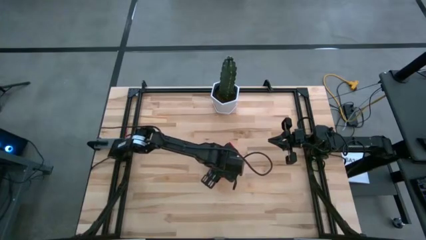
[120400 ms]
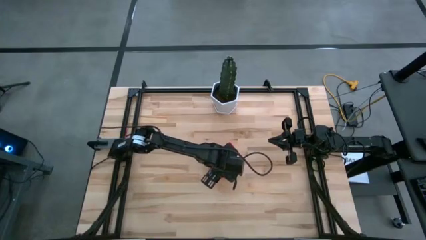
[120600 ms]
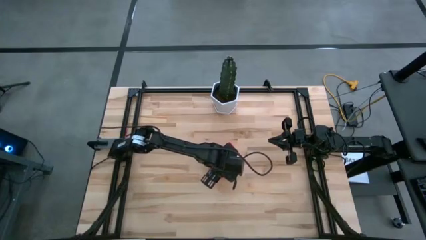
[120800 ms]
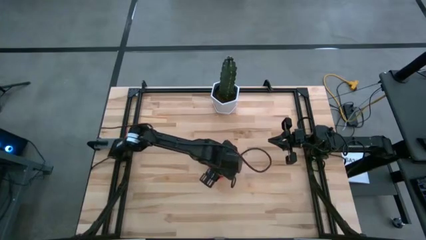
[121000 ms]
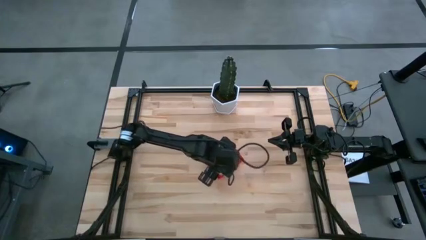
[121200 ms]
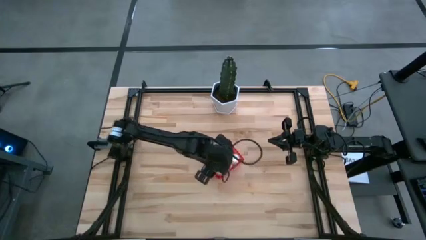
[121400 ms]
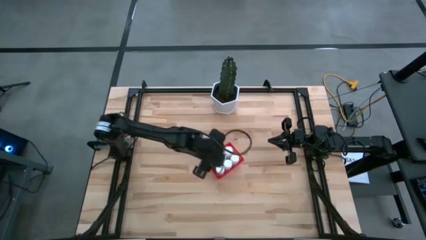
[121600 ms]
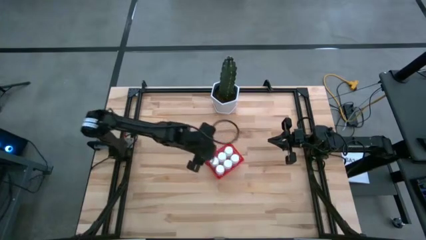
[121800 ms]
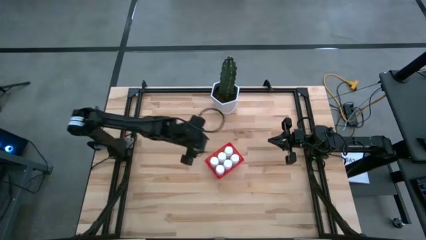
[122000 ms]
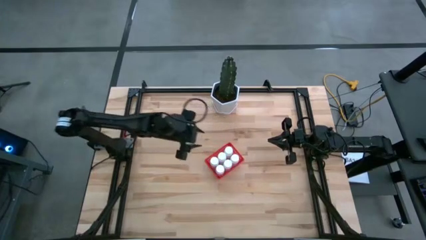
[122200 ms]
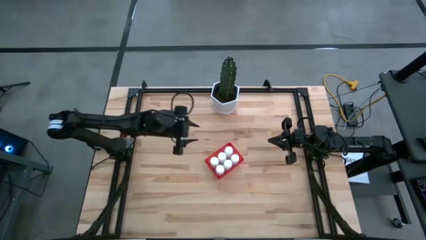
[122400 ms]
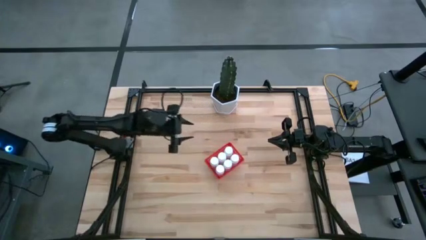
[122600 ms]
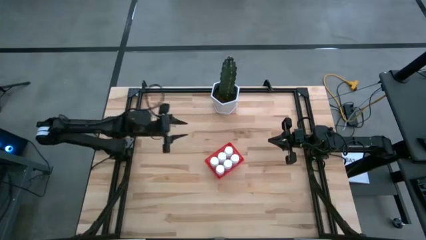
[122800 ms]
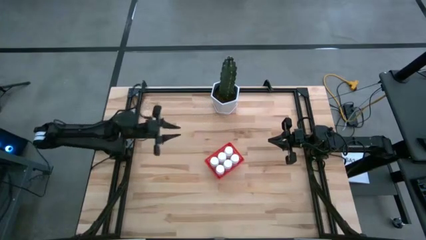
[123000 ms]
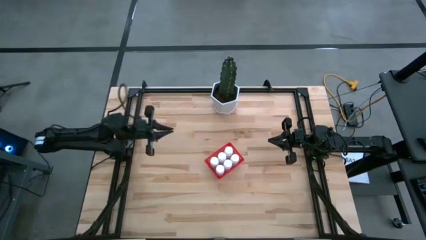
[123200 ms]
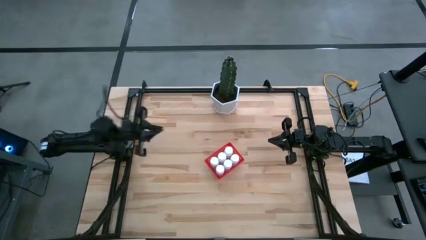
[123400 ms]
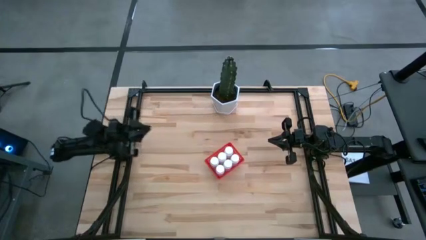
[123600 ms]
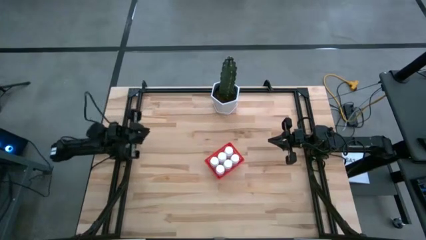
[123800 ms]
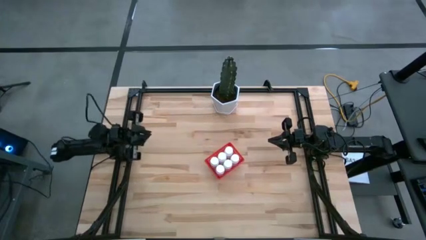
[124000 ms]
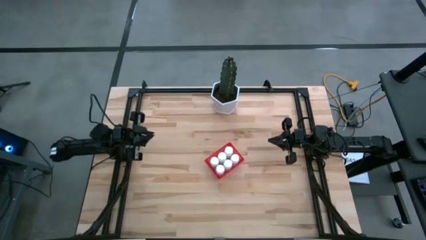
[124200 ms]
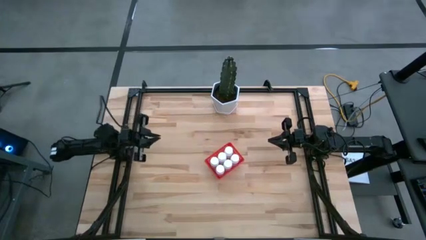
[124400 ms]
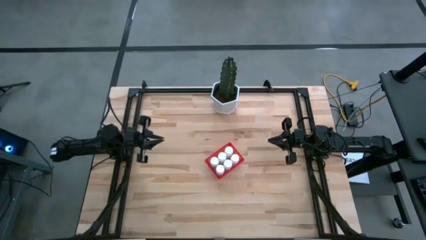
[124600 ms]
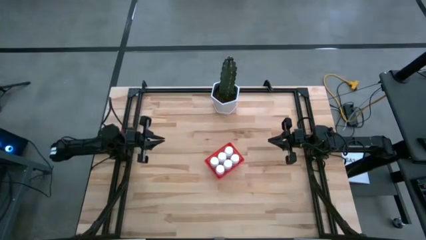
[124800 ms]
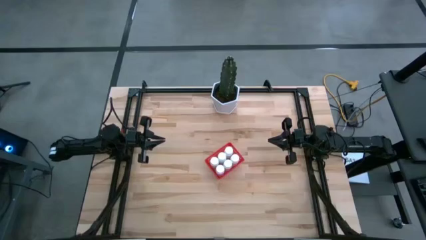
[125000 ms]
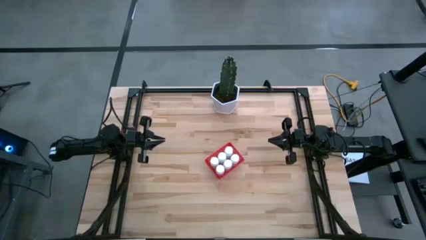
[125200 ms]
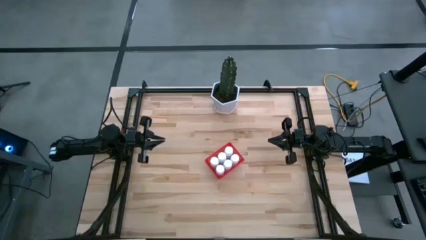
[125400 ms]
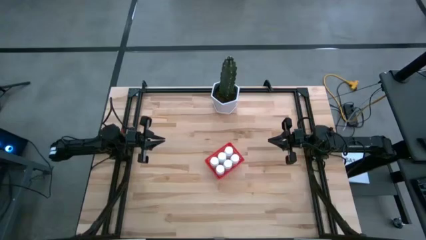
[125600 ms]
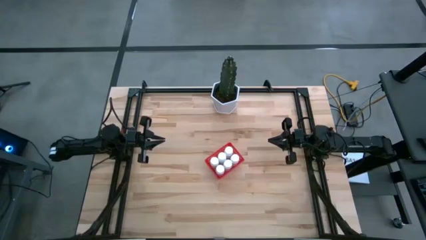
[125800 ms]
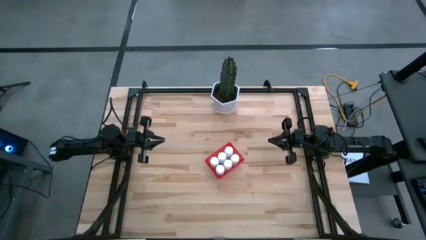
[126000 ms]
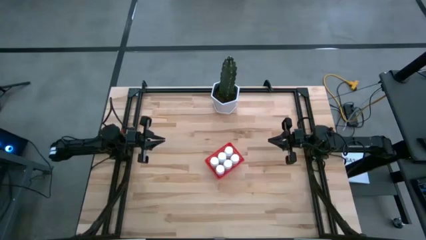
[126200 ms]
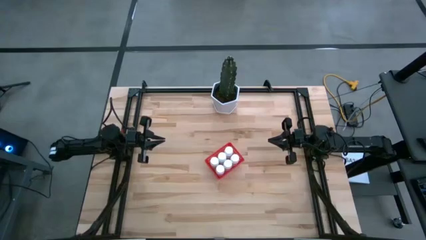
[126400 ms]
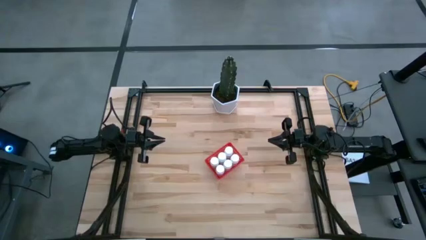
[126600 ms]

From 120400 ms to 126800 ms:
Task: Pick and place pill bottles into a basket
Return to Home Position

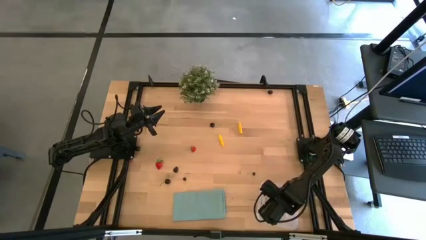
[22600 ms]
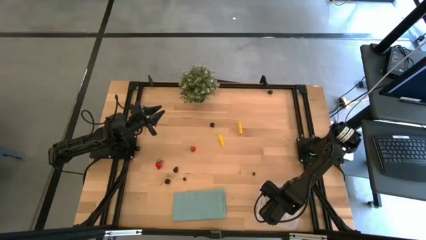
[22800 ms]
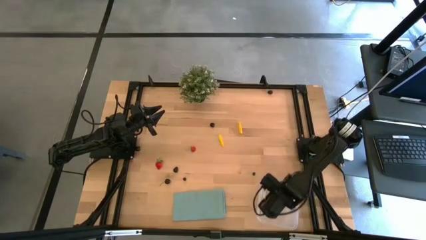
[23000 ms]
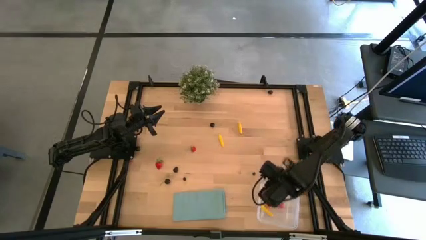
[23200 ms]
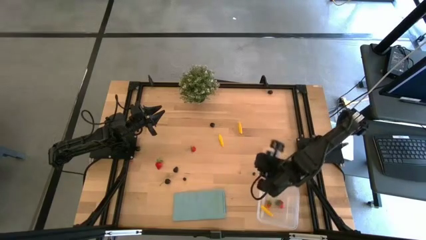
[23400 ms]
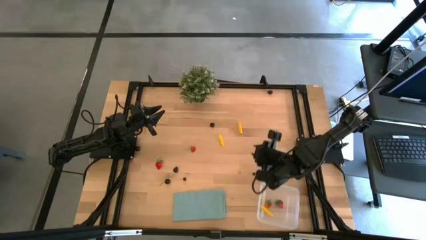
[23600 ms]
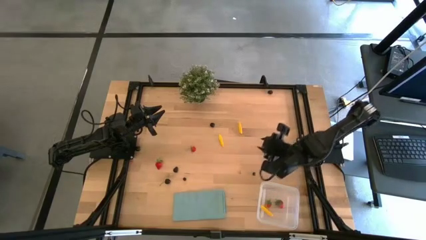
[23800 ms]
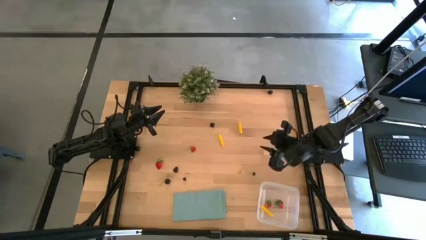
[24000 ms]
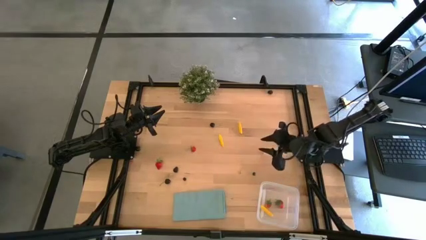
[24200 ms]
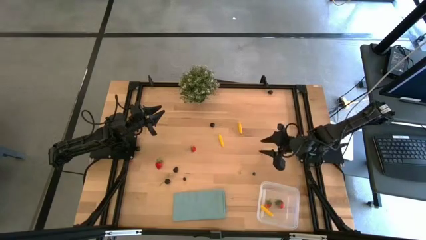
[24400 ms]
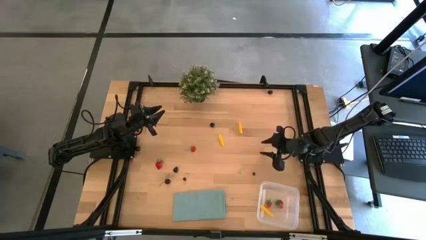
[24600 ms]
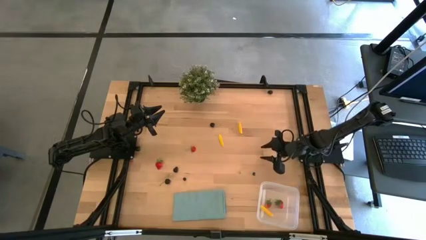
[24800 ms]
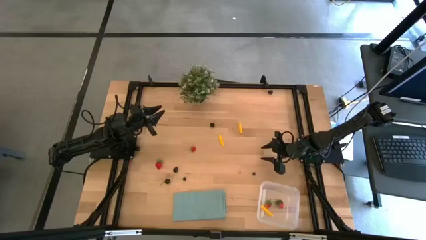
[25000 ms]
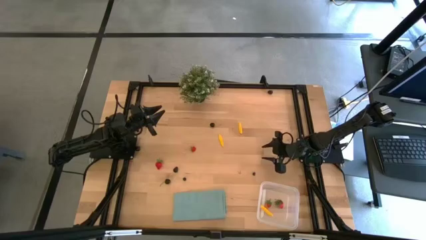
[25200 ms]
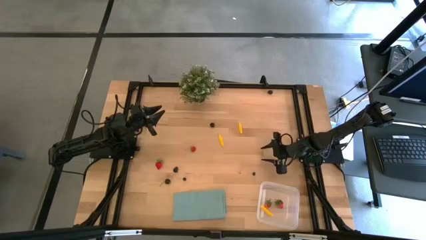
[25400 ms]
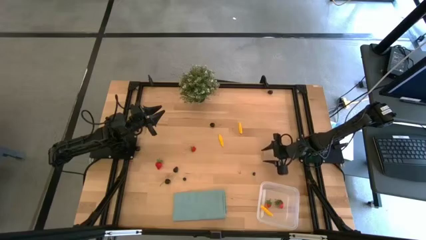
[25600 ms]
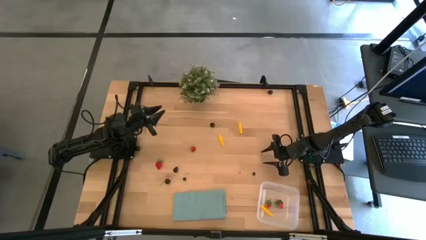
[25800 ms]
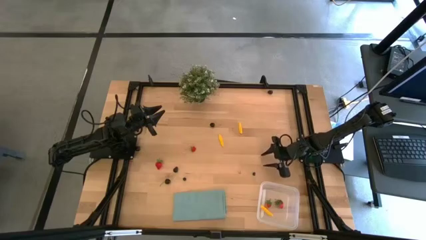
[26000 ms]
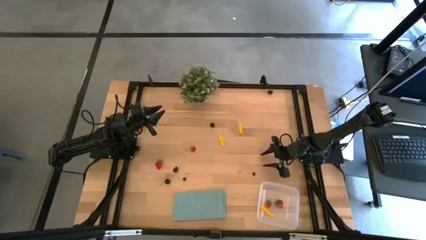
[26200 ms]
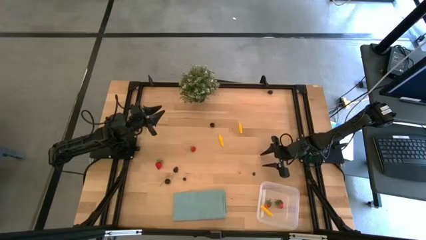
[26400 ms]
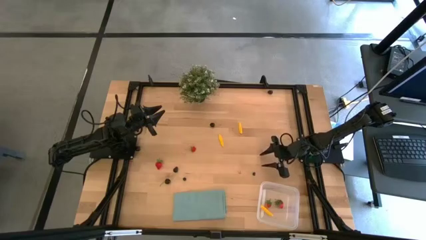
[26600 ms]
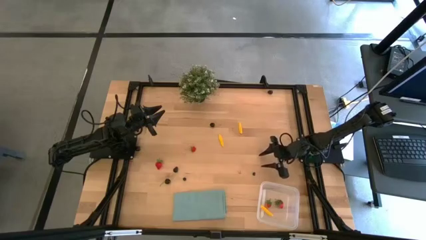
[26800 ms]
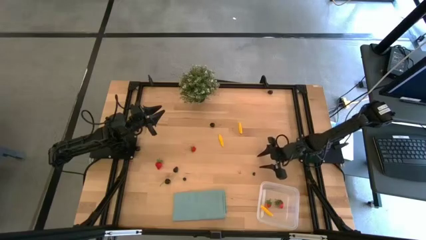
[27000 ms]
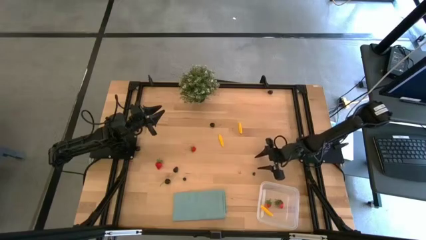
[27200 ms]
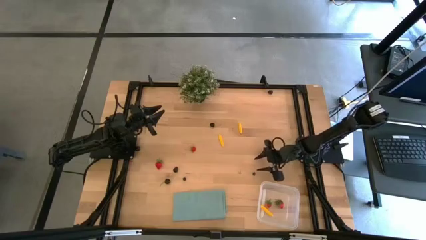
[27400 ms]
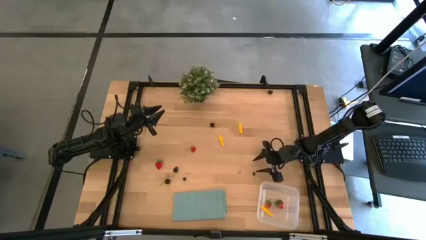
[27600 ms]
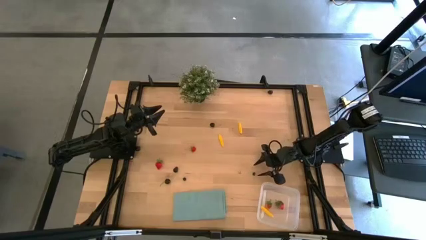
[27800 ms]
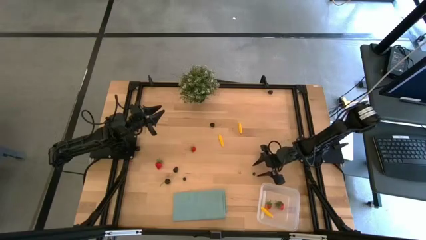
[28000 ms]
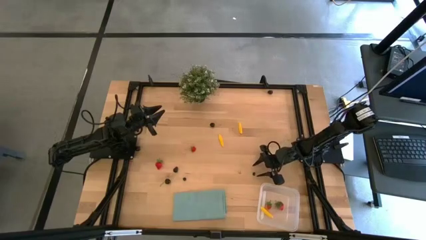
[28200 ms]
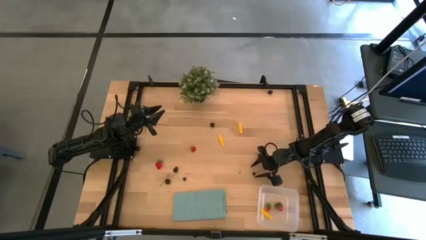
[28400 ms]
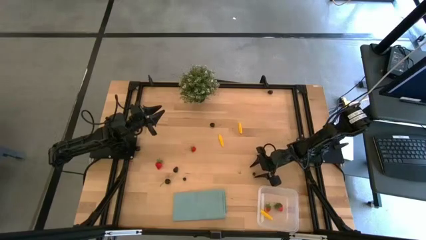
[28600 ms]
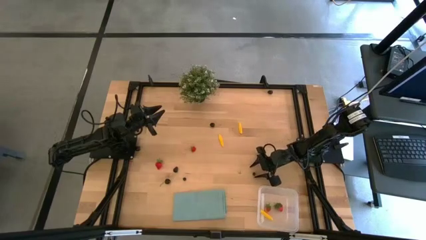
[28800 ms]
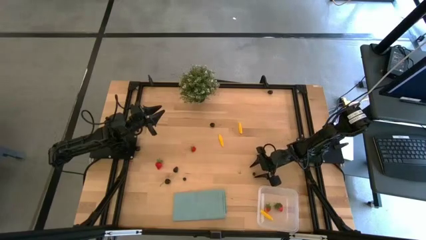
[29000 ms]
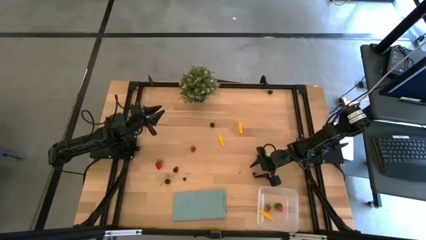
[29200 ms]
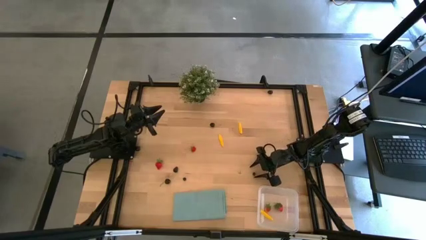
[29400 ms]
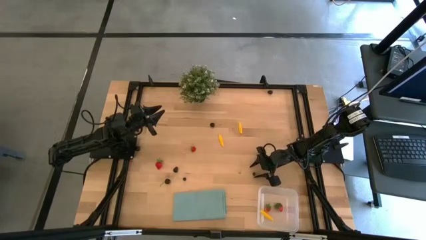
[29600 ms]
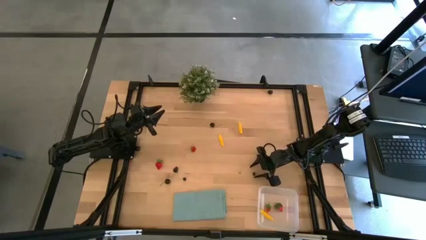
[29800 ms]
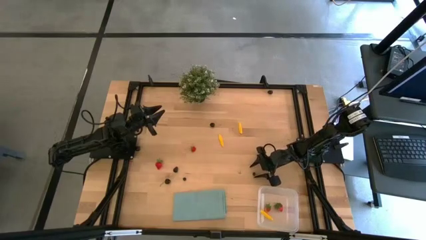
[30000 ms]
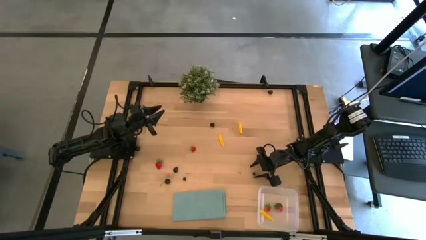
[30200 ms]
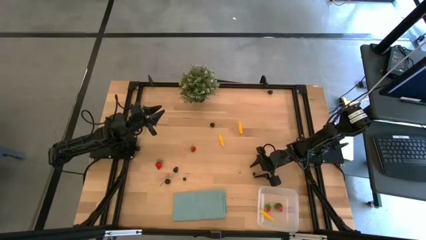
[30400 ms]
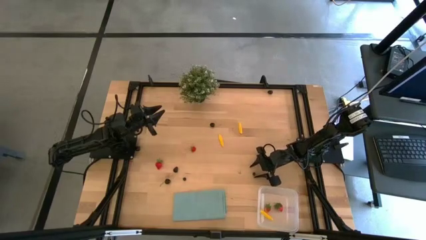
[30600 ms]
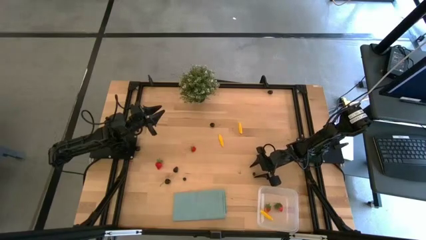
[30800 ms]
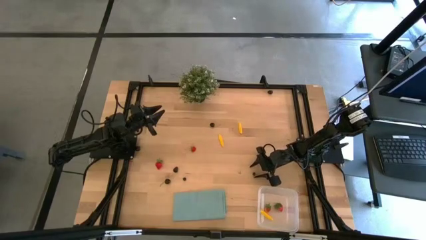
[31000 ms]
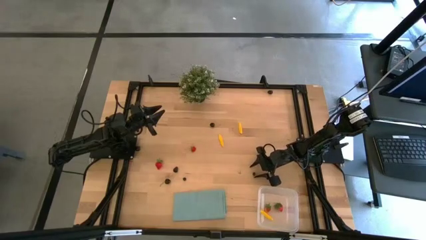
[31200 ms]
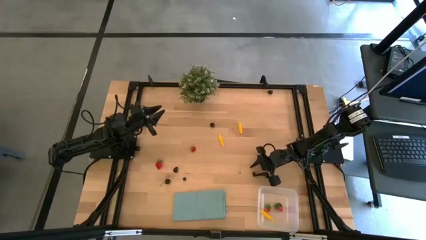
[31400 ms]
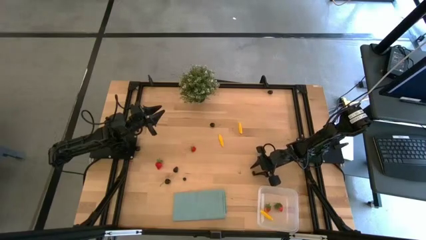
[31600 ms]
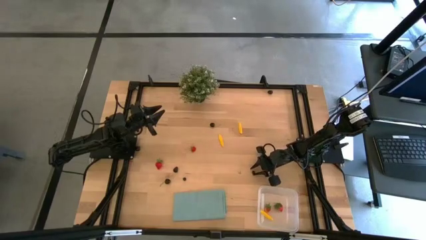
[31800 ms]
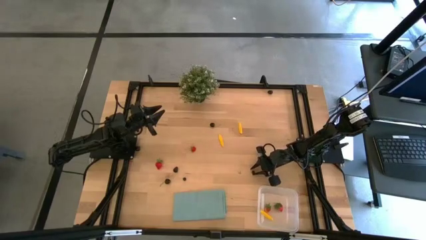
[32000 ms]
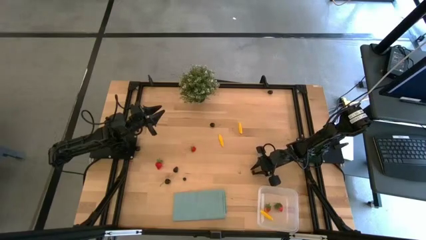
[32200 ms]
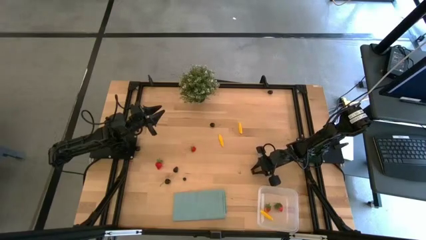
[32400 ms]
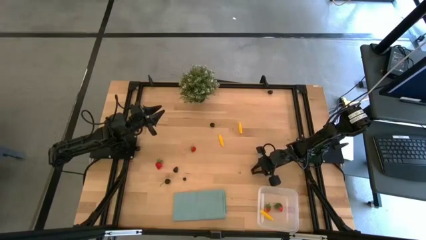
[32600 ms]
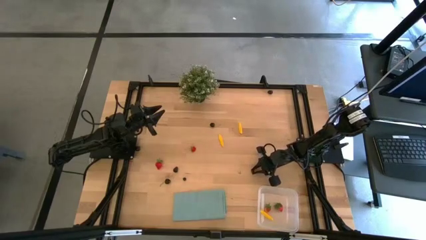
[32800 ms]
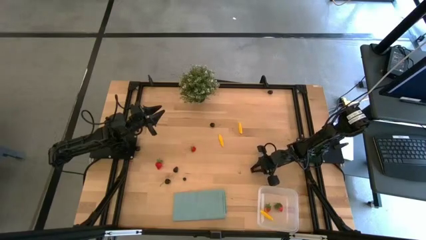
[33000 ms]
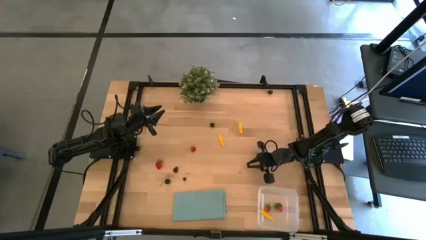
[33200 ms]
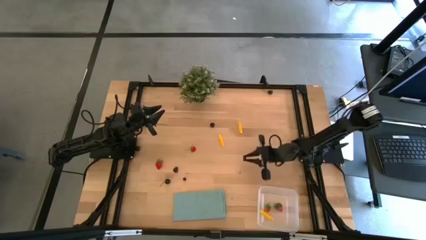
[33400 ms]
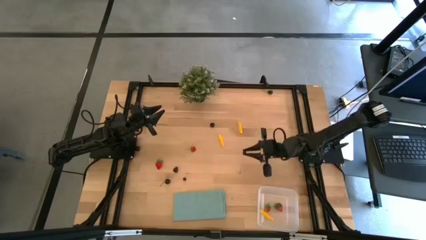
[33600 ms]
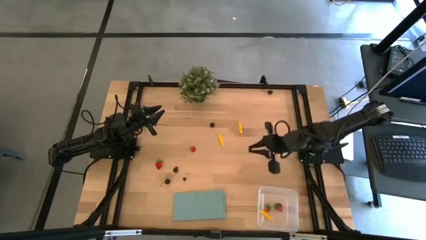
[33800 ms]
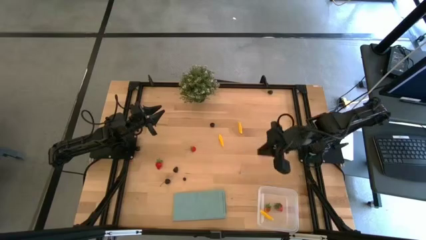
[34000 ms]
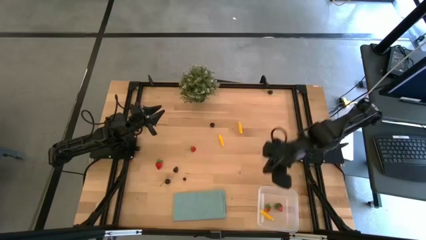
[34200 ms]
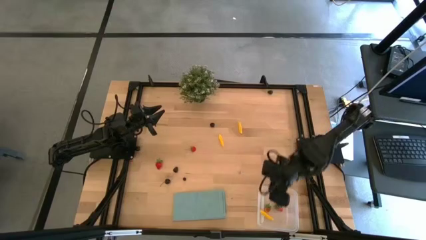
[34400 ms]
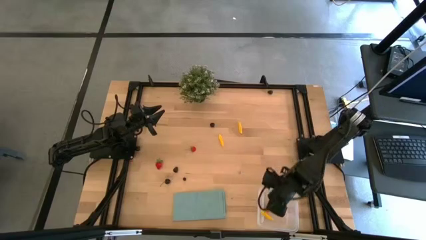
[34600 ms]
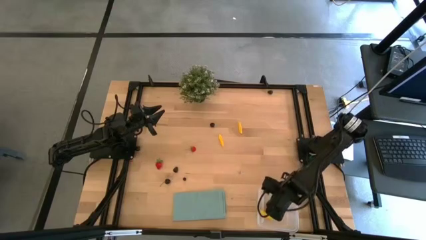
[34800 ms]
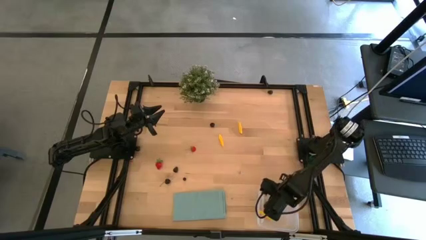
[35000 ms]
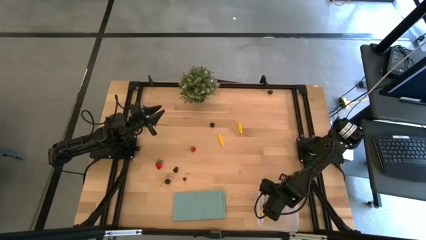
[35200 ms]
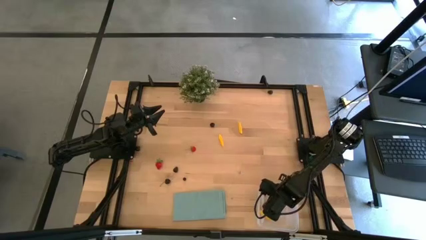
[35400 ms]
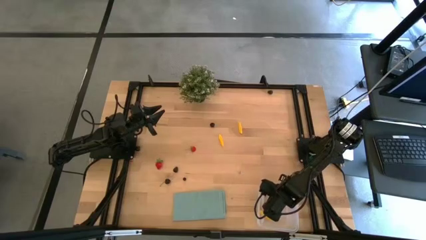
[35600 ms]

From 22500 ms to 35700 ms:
Task: Pick and placing Produce into tupperware
Put the blueberry into the transparent bin
